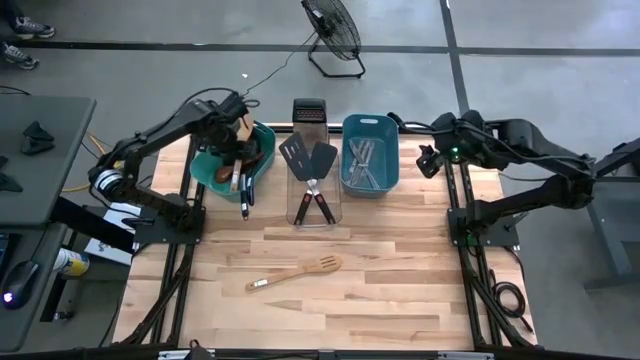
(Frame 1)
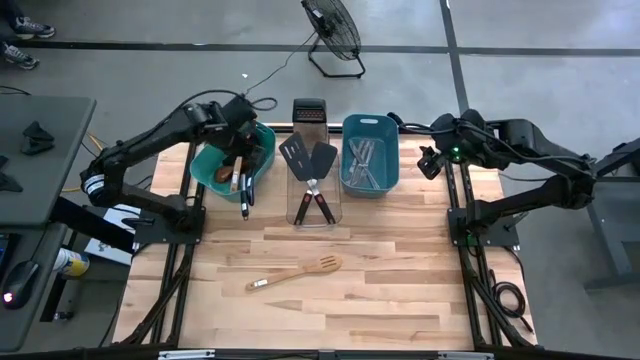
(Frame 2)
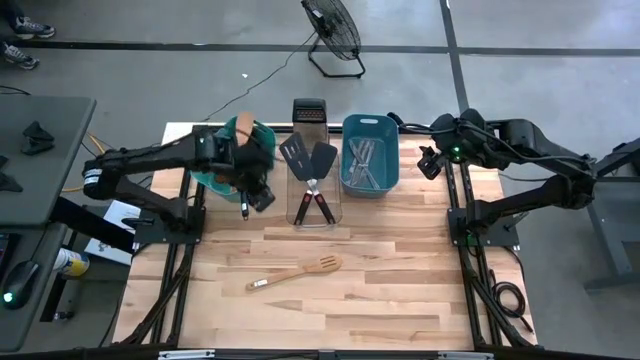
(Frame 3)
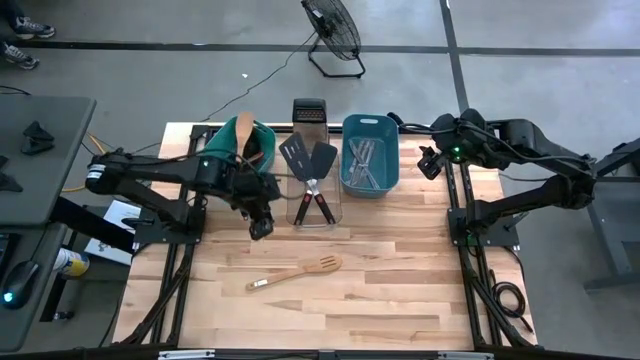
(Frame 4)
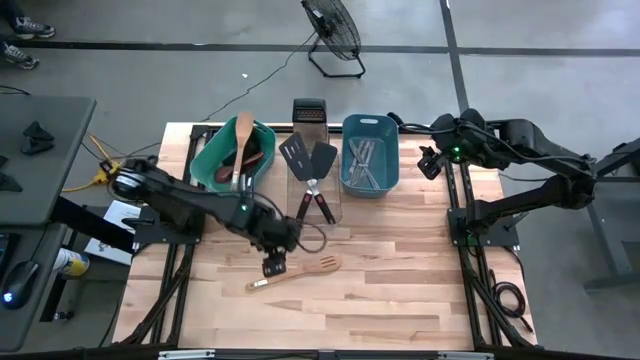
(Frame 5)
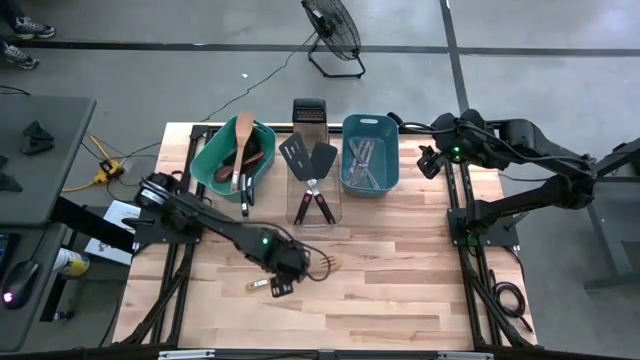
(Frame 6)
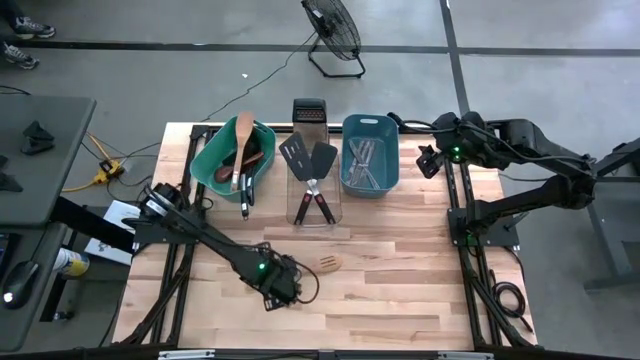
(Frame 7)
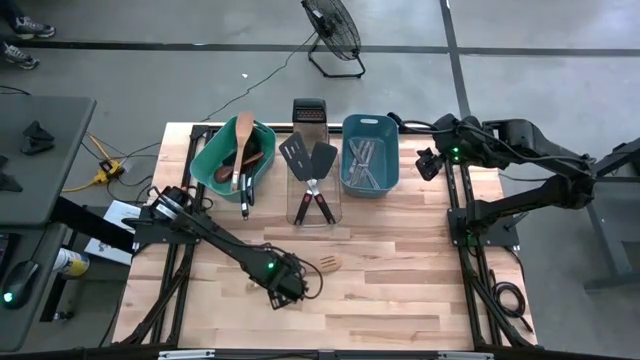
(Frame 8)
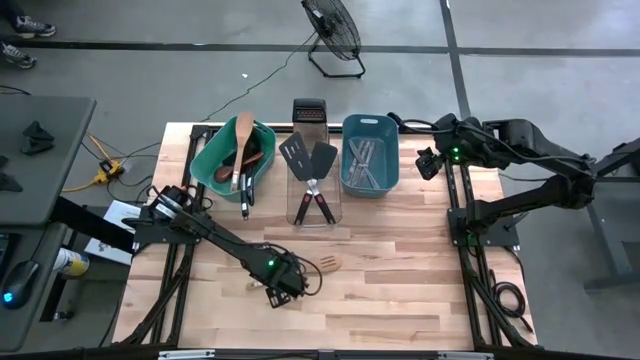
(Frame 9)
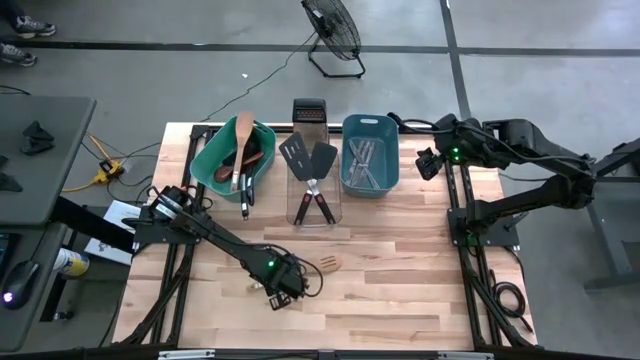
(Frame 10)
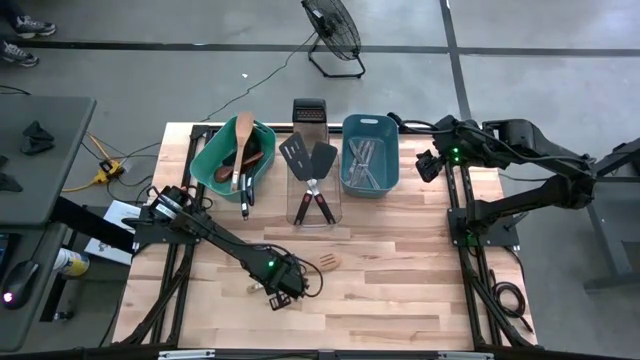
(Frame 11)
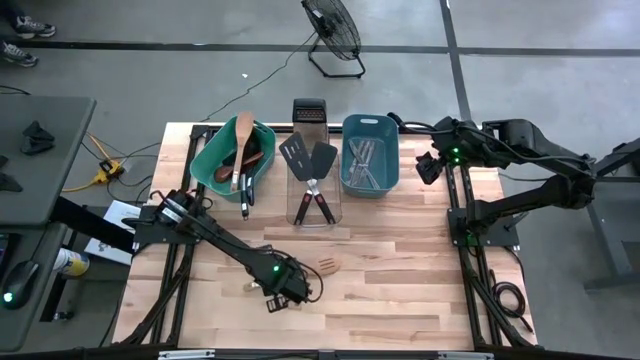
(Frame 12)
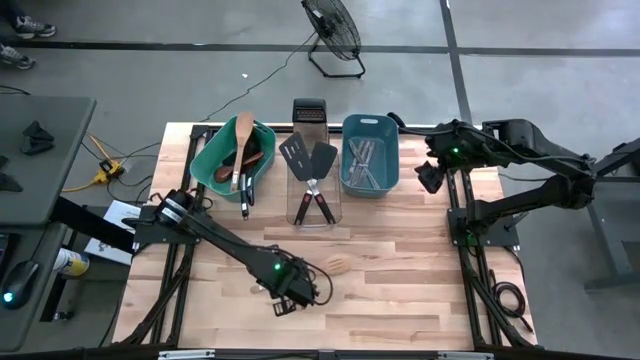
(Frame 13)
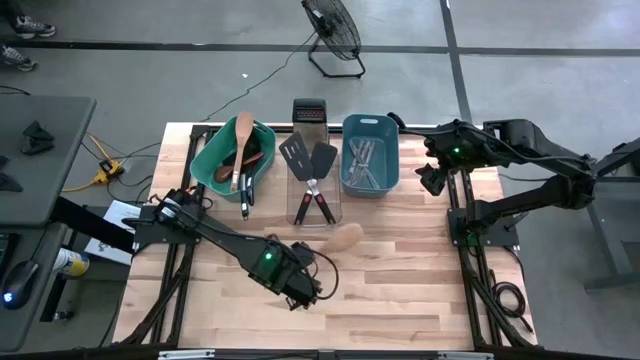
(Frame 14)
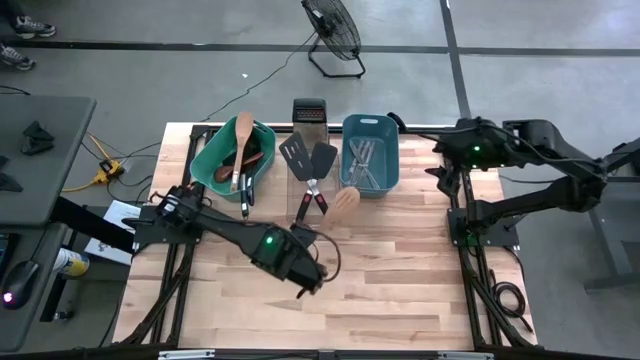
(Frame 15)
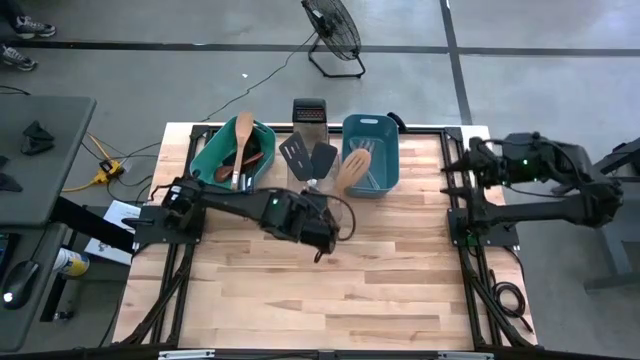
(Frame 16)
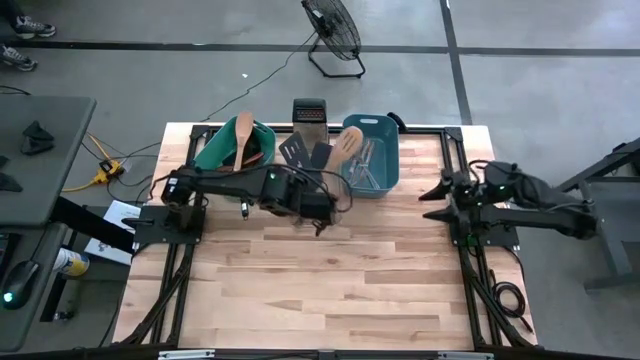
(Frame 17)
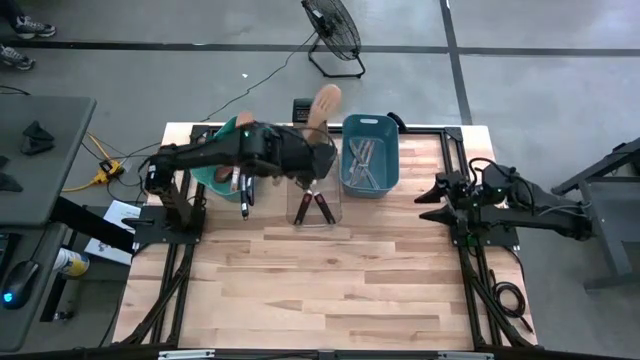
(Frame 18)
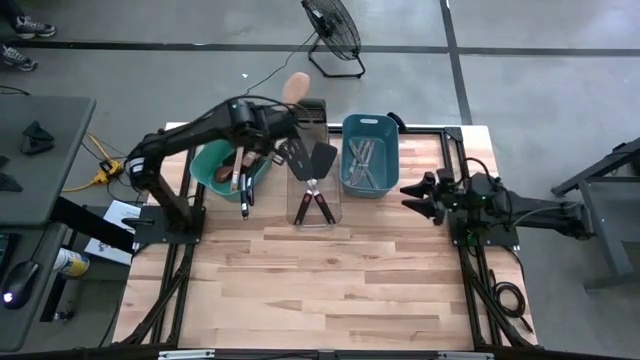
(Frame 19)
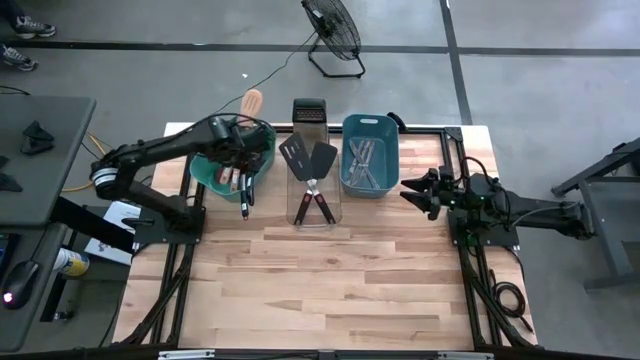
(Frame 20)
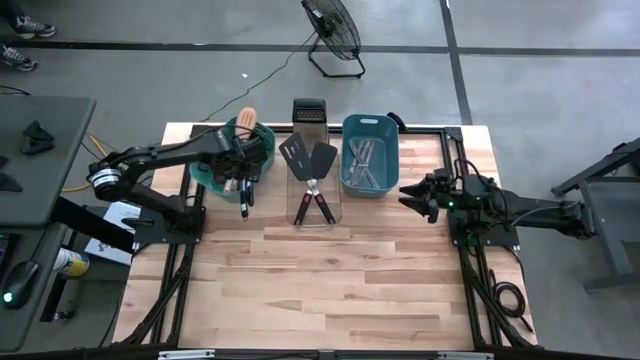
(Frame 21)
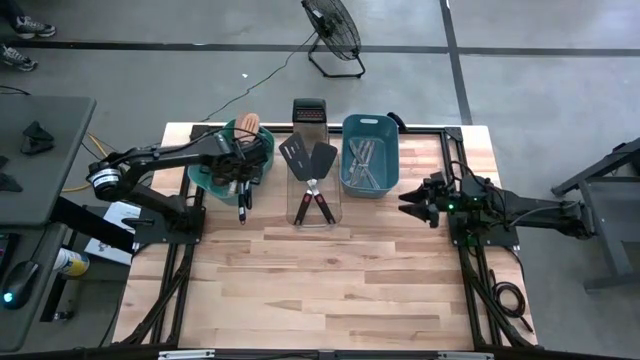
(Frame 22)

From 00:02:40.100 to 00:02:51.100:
Task: Pick & Place Kitchen Items
Put the wooden spatula into the green bin

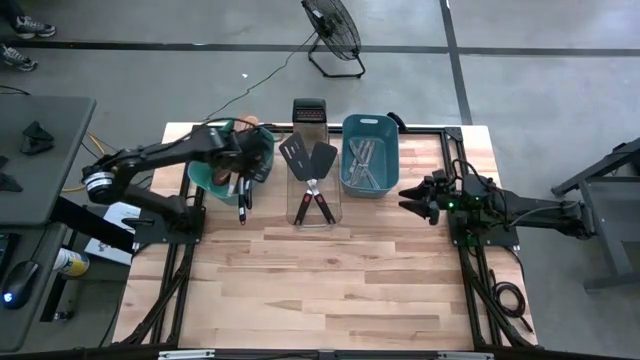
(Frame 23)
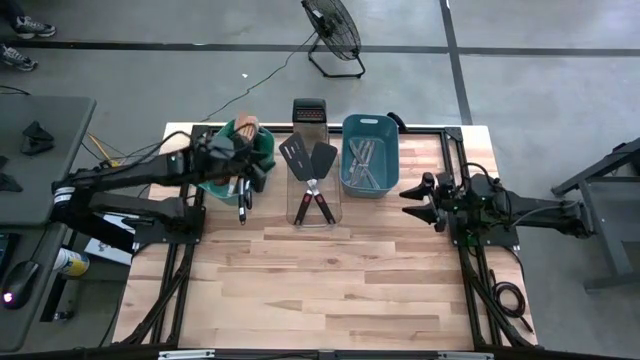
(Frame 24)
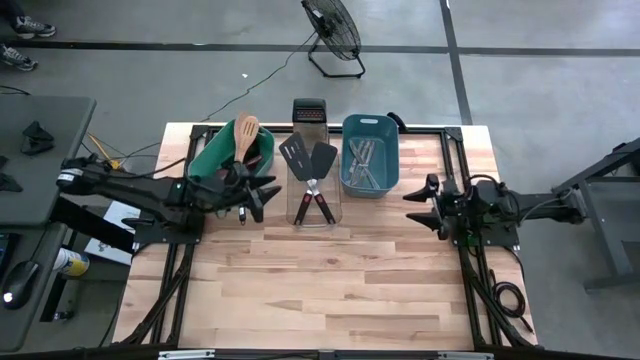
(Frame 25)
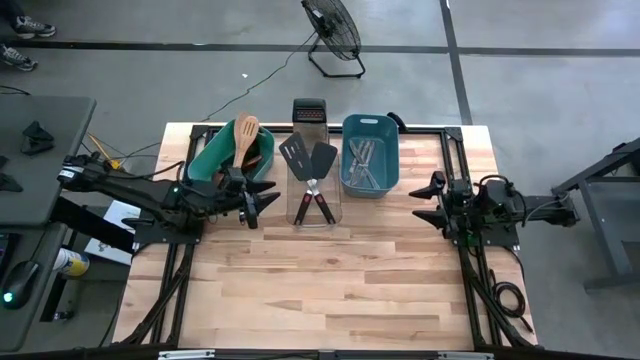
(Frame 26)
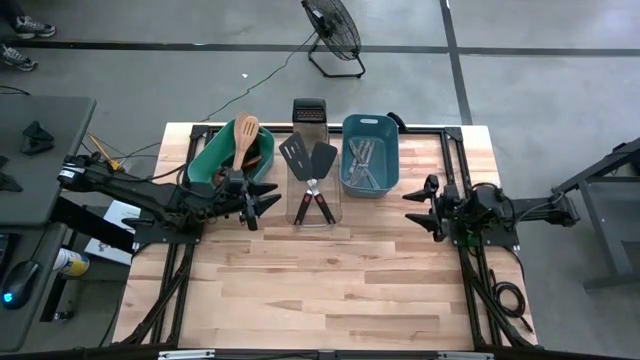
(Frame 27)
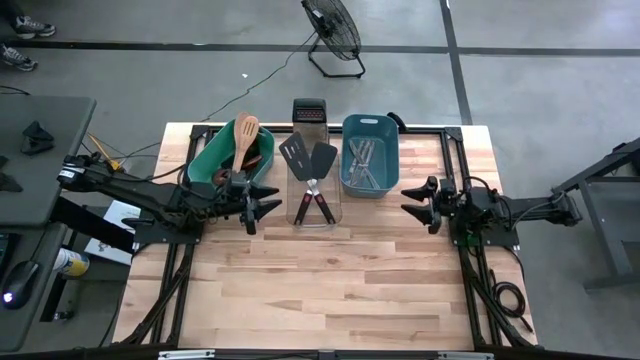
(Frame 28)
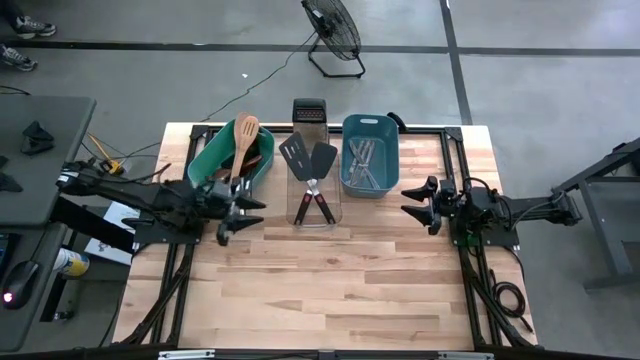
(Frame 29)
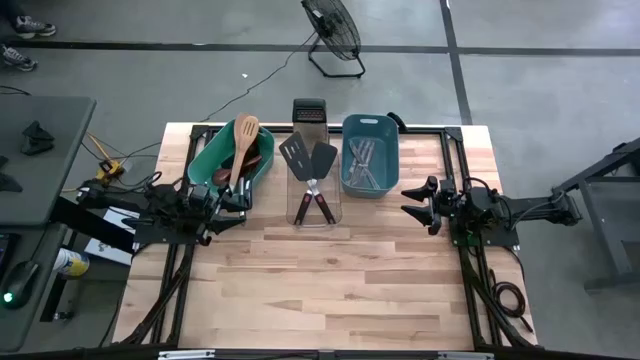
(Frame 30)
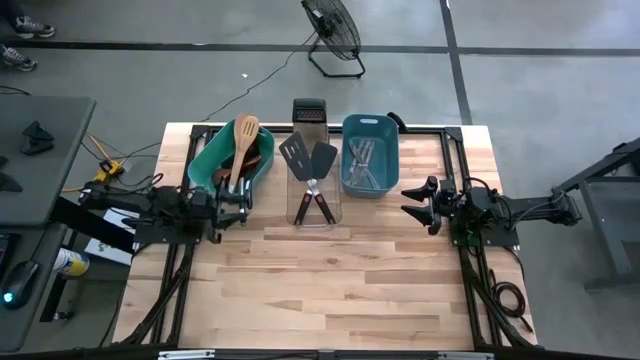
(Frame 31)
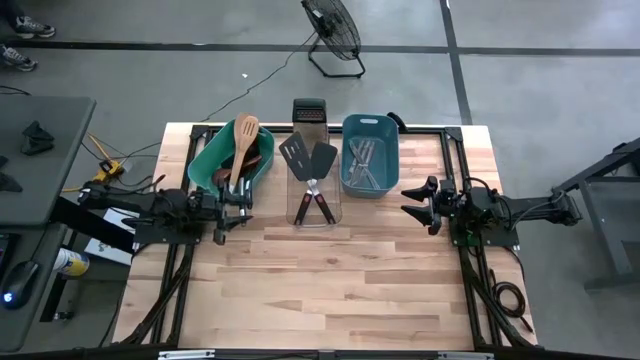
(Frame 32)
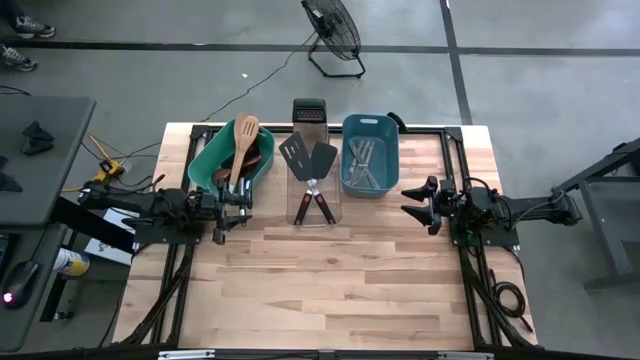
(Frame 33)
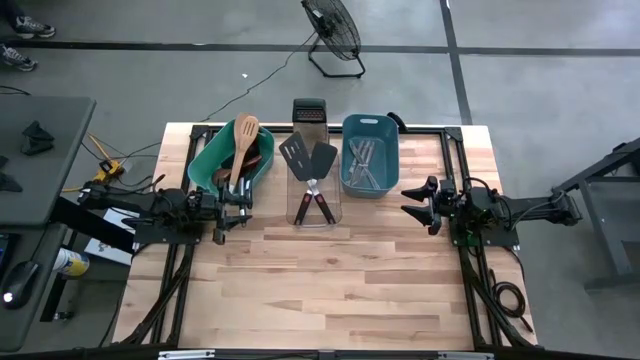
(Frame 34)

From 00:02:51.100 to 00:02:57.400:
Return to Home Position

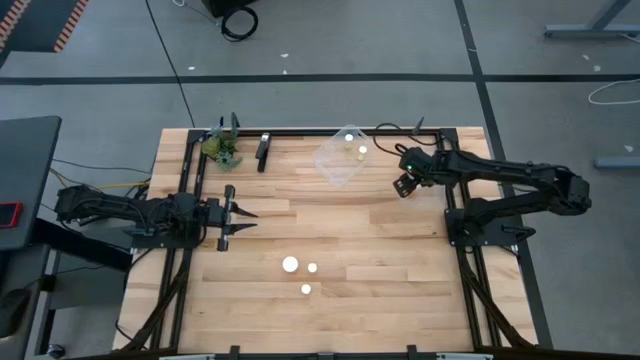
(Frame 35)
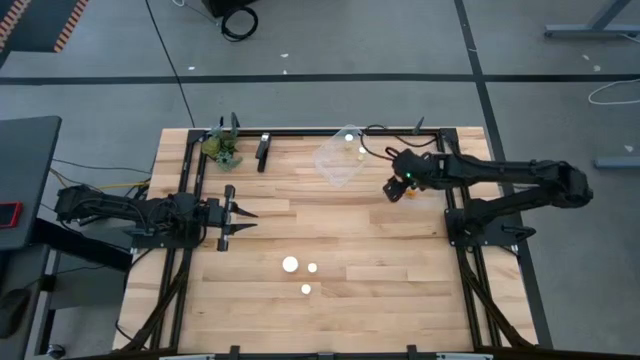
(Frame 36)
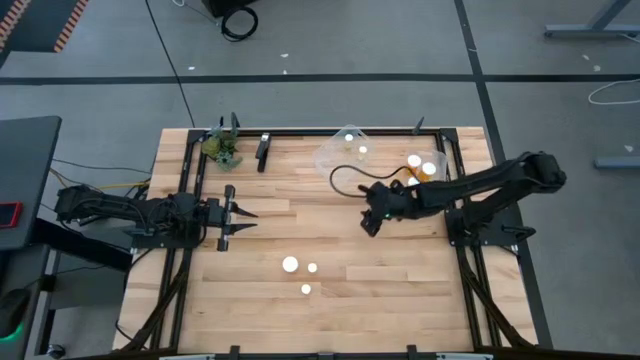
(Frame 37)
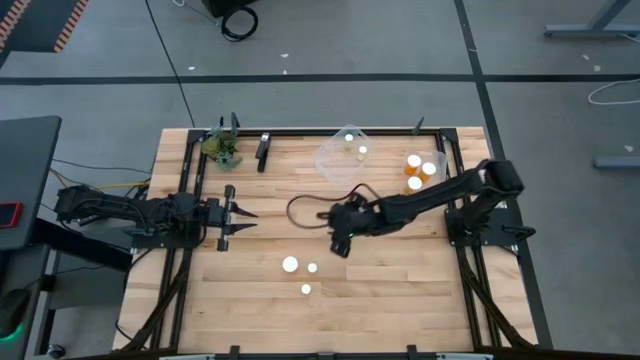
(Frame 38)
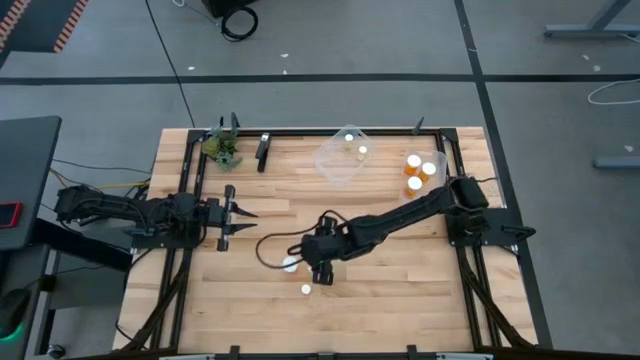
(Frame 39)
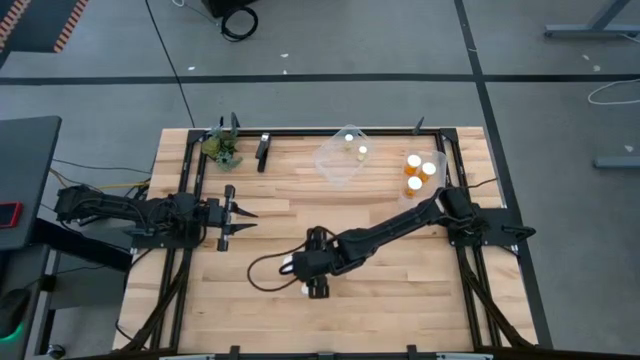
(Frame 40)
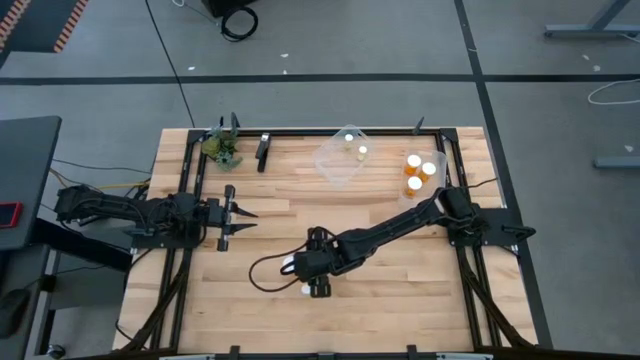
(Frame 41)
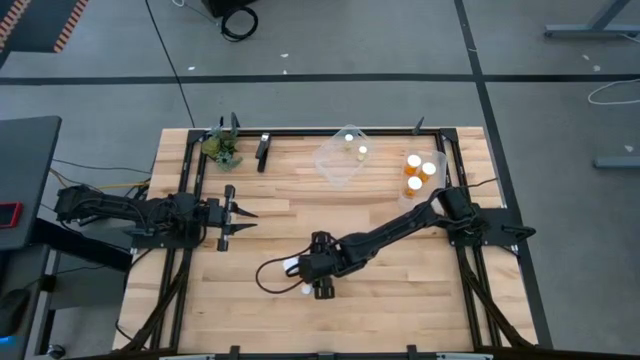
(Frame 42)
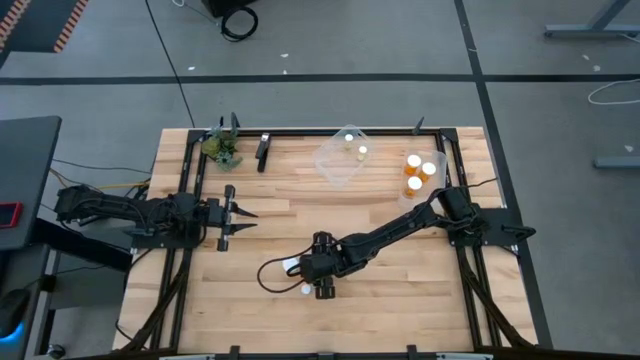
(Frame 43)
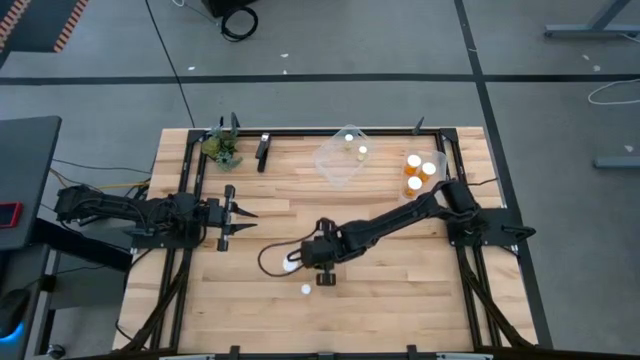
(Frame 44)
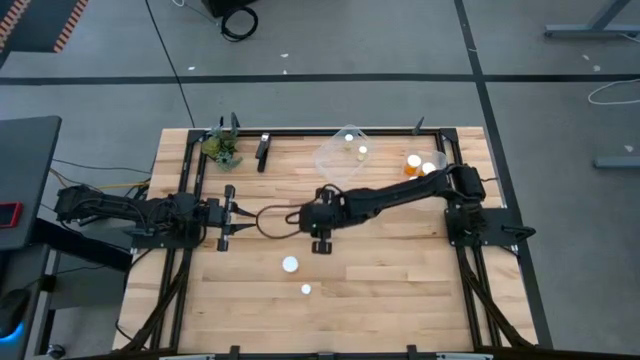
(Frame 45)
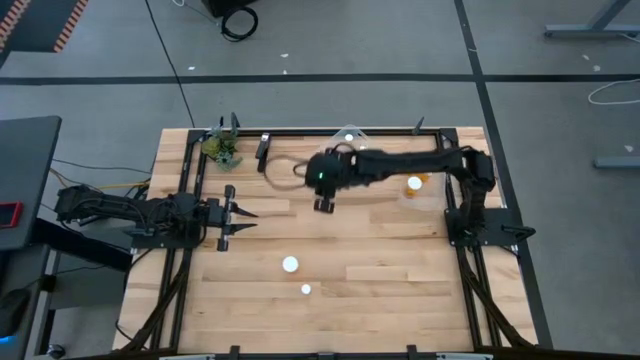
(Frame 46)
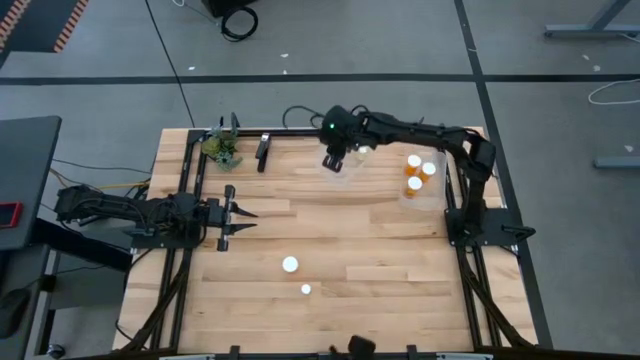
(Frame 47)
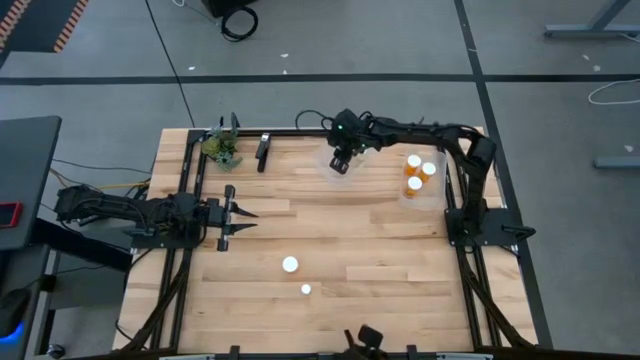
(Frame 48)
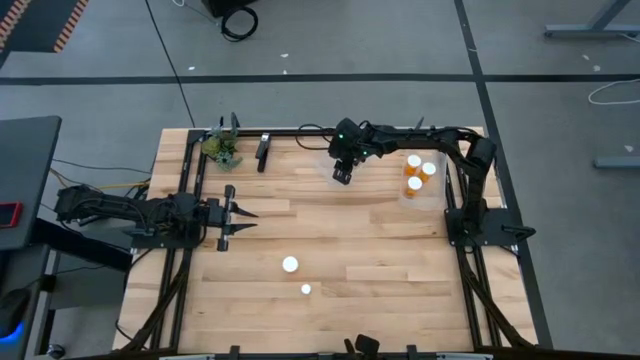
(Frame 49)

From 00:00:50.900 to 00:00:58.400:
Task: Pick and place medicine bottles into bin by pill shape (circle, oval)
Put the small yellow pill bottle into the left transparent bin
